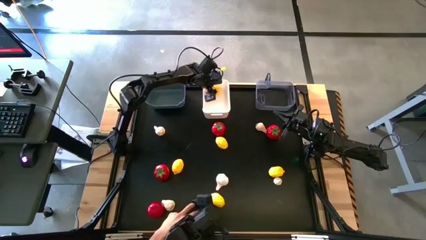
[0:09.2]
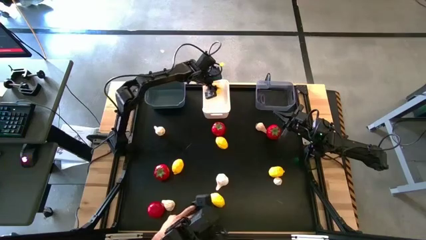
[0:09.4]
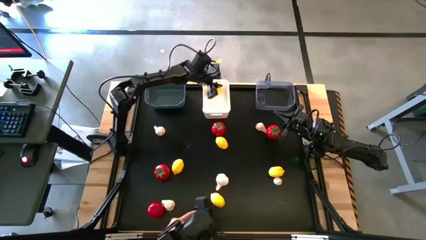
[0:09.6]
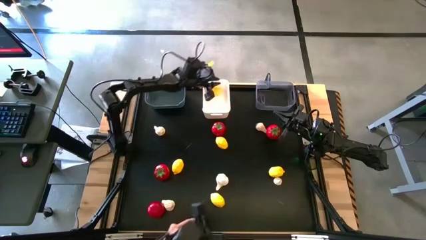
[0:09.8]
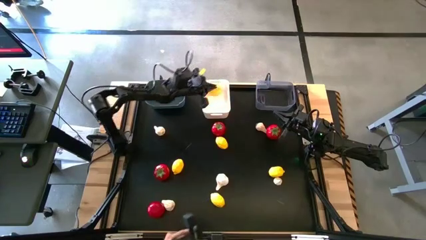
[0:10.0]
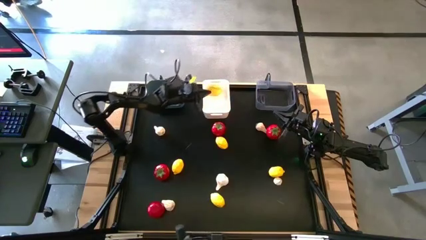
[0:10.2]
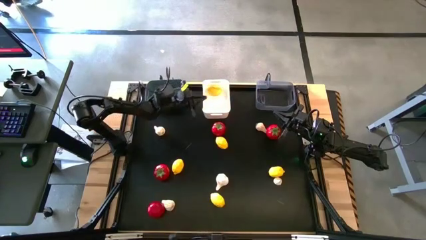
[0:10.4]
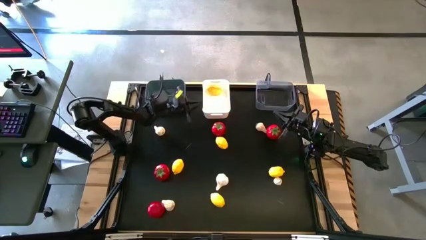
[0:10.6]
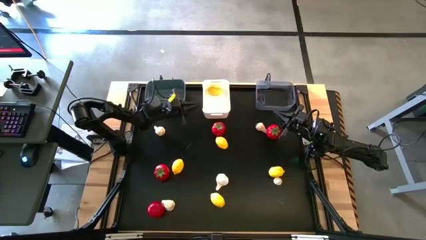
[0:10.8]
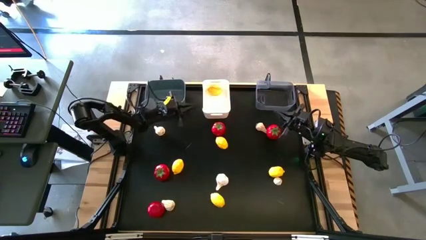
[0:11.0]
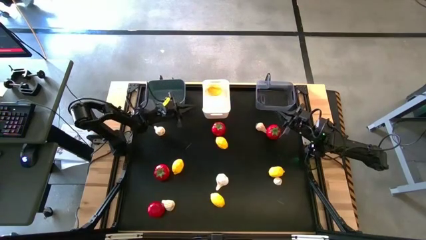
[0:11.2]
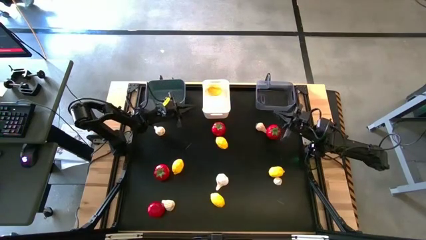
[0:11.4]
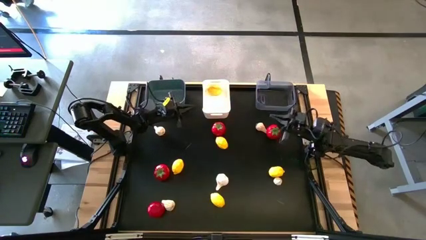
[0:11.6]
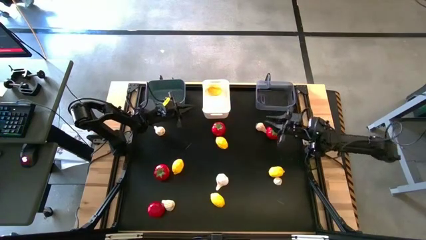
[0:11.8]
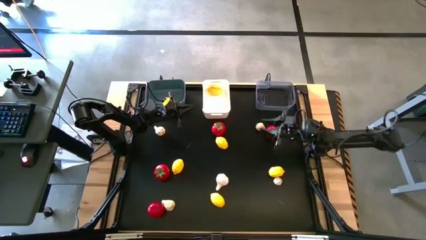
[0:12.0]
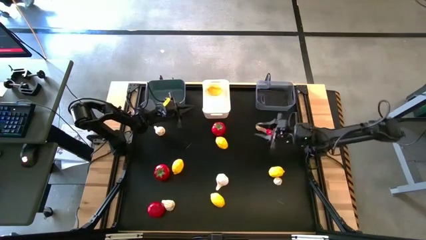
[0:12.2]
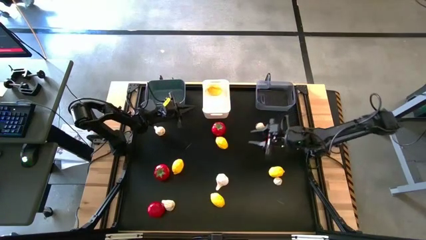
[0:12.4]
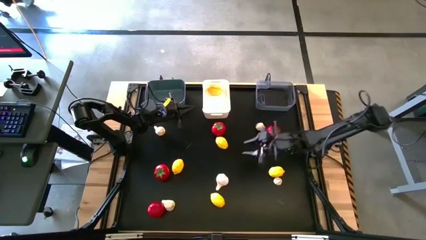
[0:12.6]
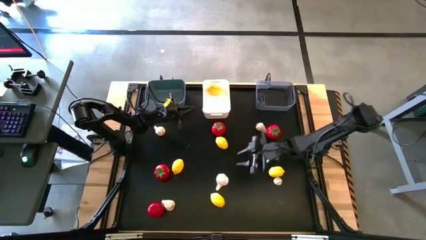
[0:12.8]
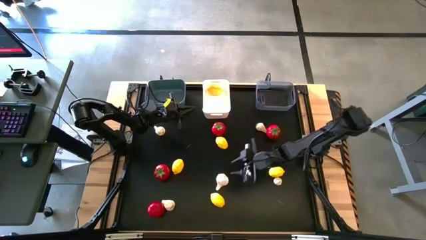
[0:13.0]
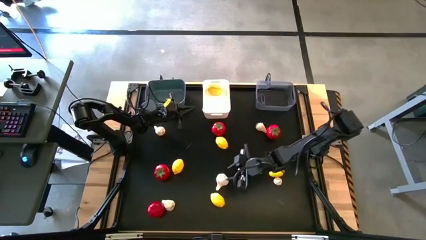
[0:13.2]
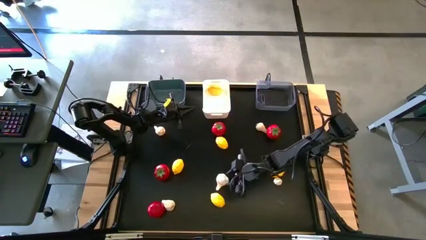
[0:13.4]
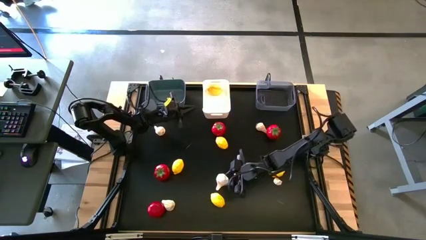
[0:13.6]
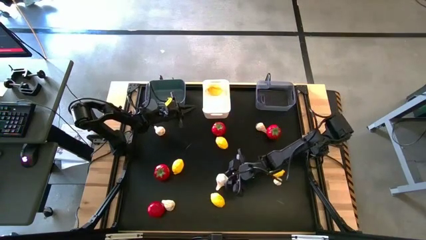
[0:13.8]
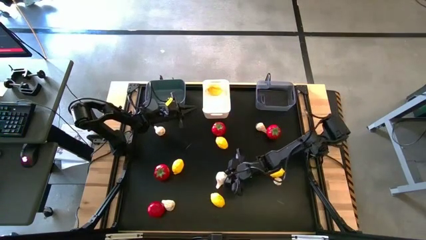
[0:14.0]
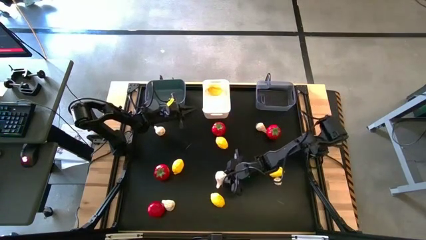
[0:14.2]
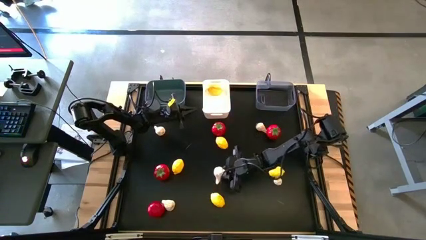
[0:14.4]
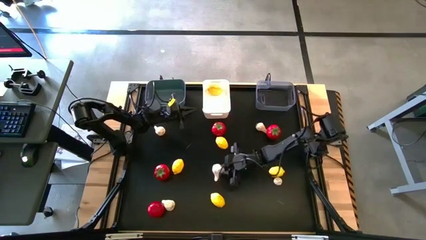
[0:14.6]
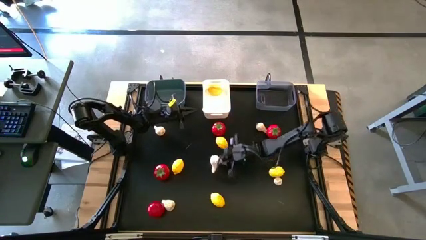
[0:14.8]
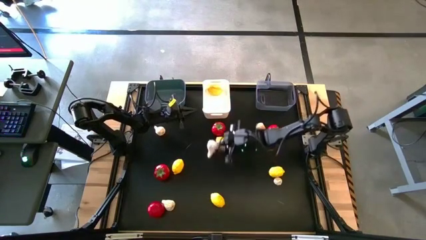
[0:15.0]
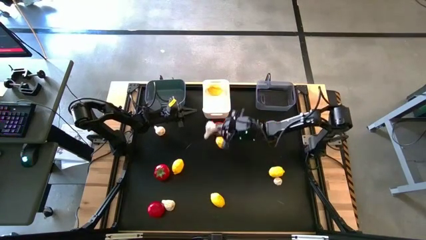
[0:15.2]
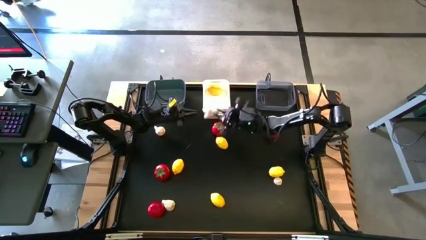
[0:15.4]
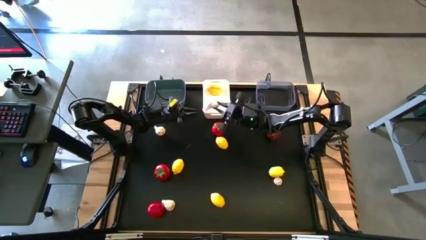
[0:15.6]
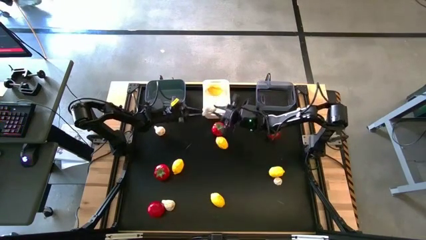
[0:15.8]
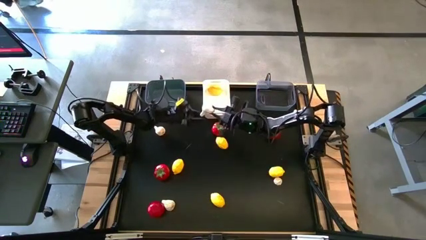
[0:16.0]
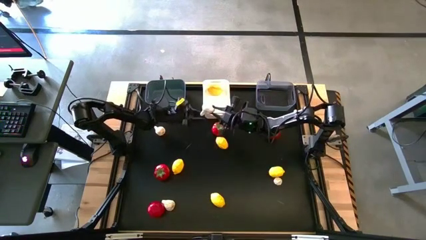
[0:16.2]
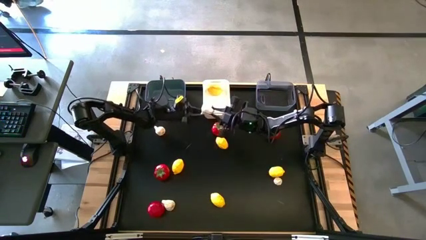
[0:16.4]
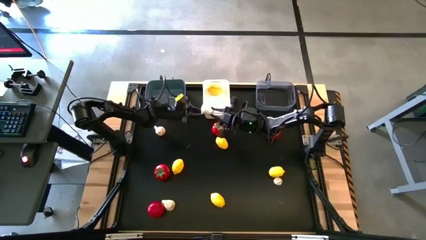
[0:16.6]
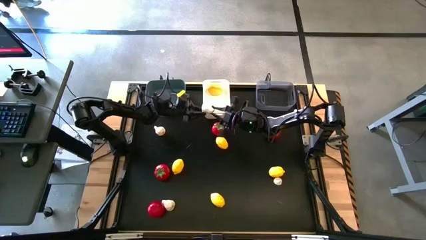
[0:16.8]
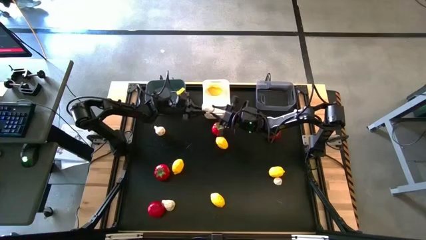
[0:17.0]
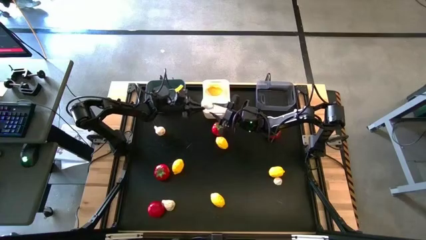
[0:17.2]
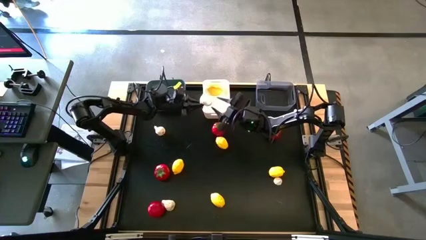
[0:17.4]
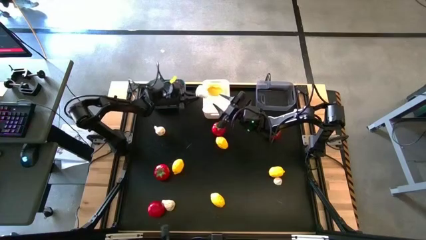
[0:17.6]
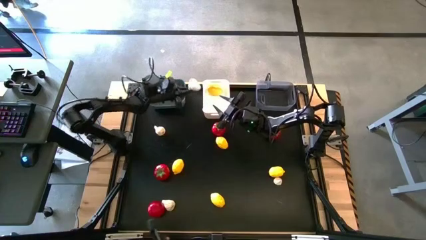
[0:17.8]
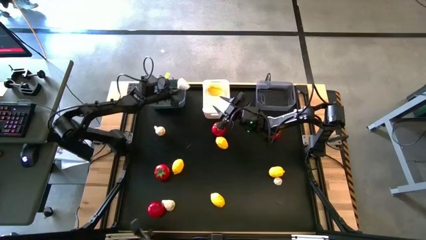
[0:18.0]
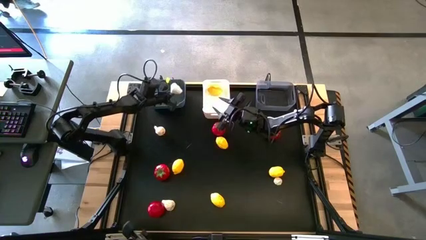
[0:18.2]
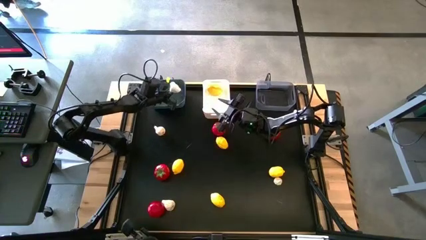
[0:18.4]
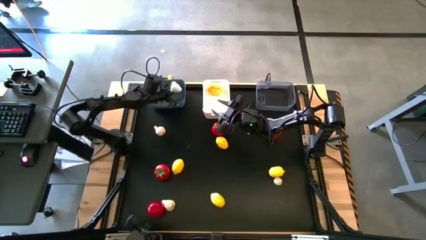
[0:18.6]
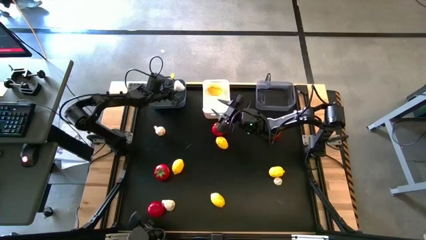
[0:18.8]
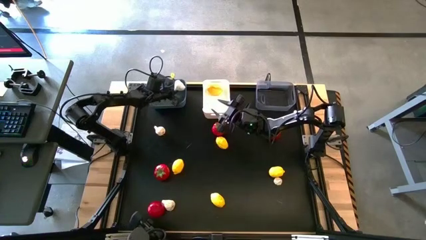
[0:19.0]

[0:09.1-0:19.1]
Task: Sort produce into baskets
Put the white garlic into the blue bin

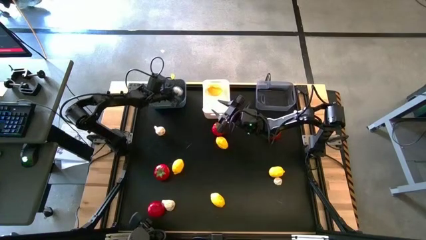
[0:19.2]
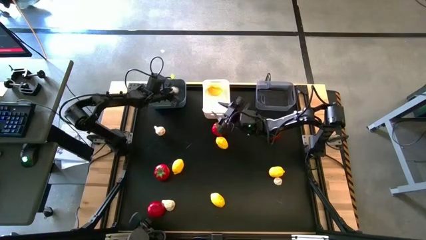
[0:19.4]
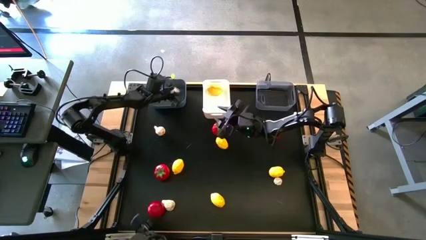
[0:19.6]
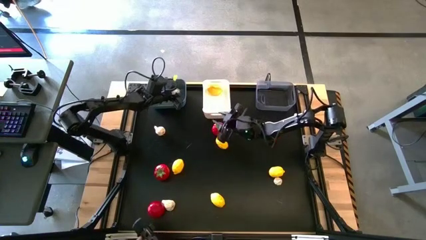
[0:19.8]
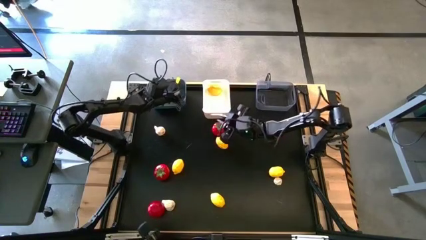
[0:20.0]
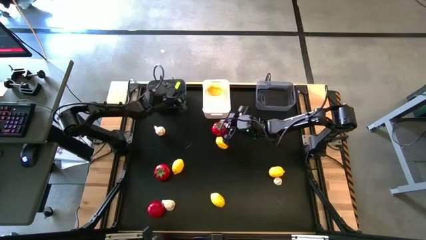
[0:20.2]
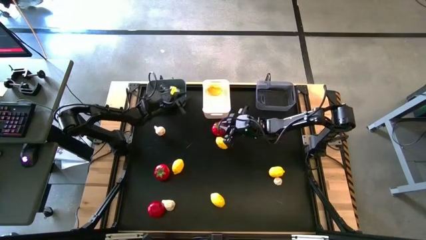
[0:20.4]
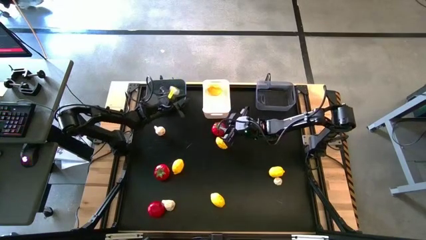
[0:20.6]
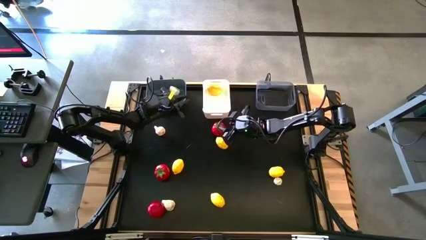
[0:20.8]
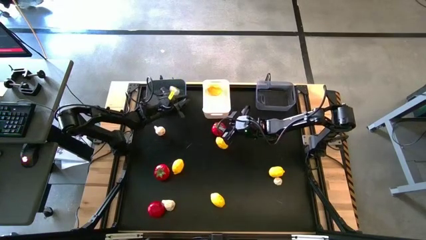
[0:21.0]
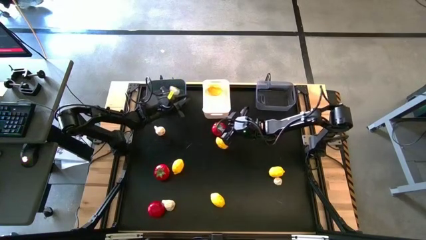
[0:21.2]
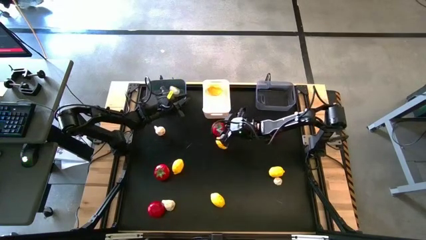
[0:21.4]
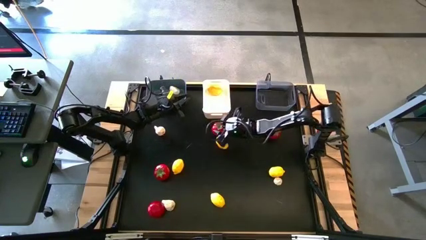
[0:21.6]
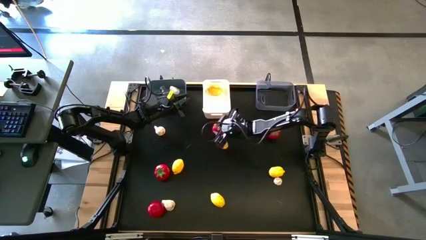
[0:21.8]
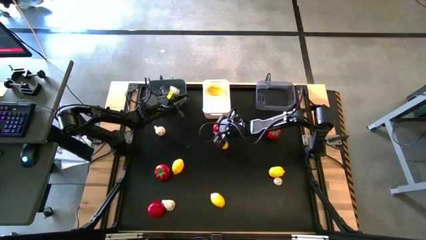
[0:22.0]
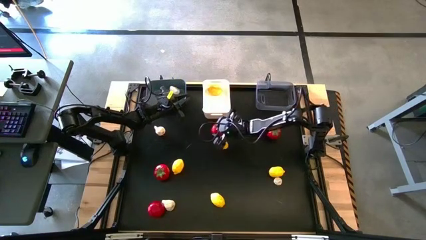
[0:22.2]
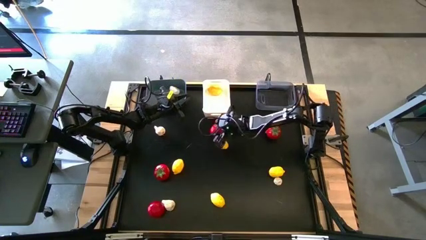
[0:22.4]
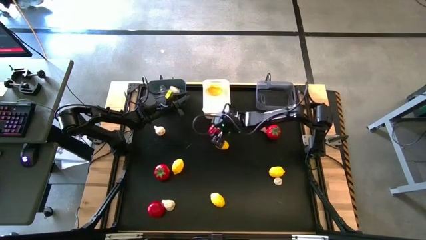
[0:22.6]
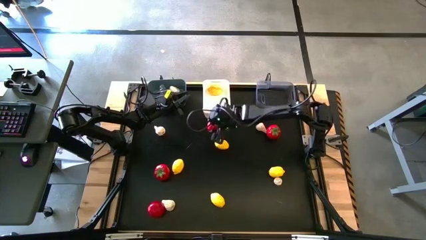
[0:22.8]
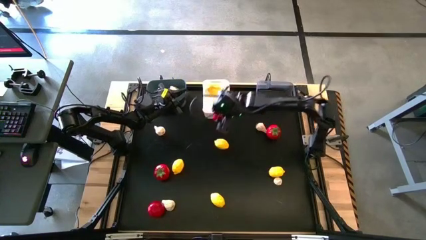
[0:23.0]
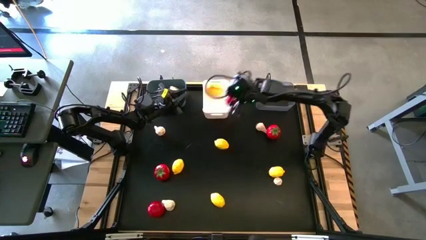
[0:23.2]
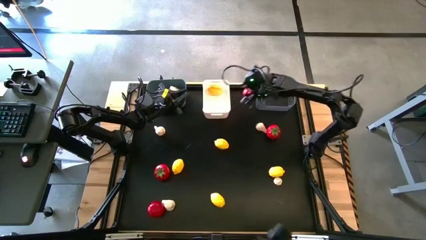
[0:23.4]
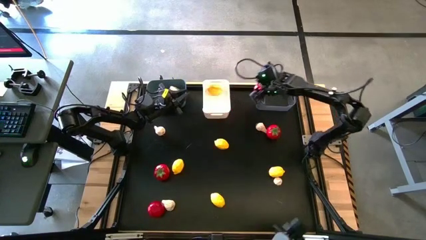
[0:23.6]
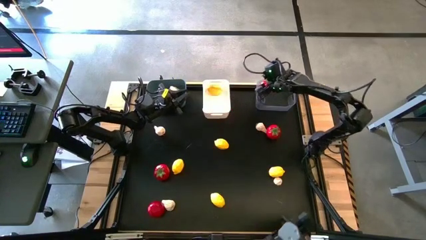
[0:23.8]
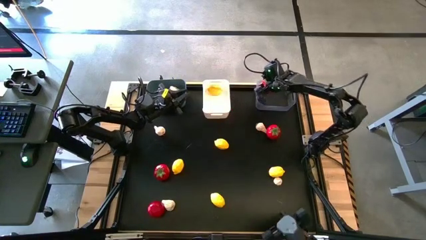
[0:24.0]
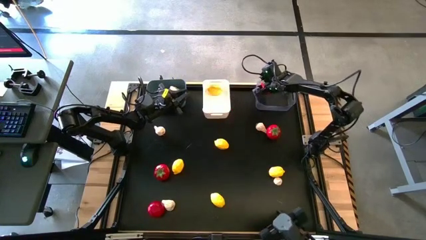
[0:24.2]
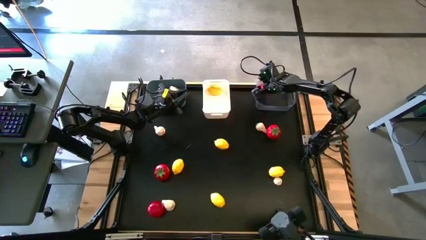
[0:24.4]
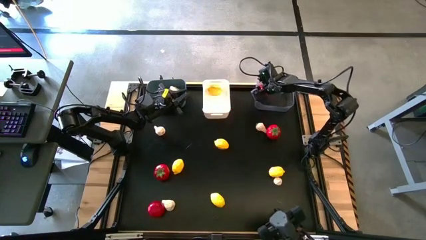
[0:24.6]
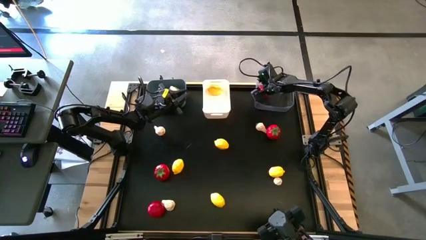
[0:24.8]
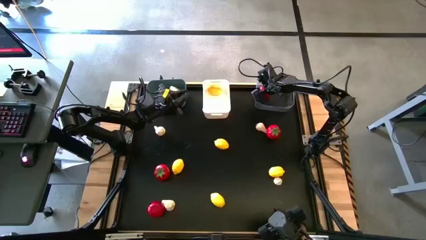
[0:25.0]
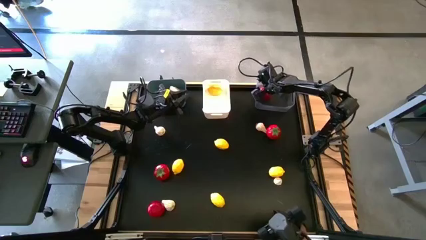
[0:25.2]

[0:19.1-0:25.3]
Put the red tomato into the transparent bin
